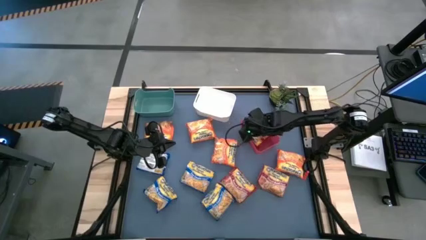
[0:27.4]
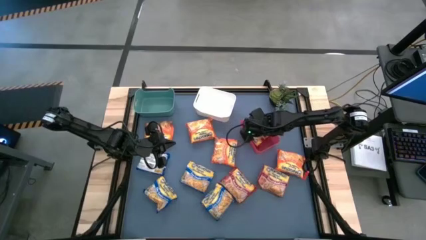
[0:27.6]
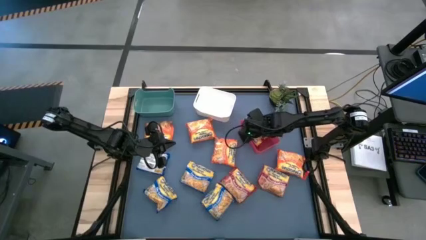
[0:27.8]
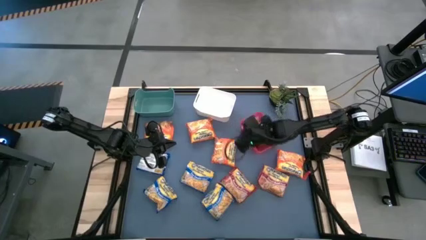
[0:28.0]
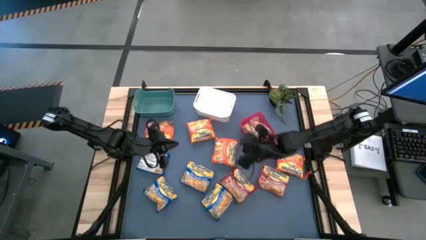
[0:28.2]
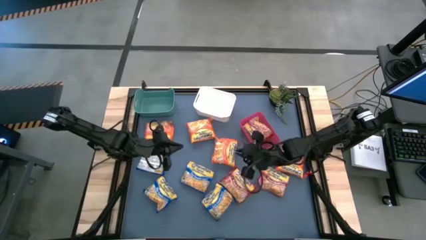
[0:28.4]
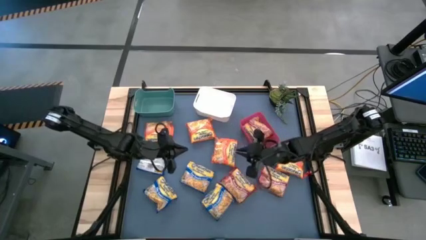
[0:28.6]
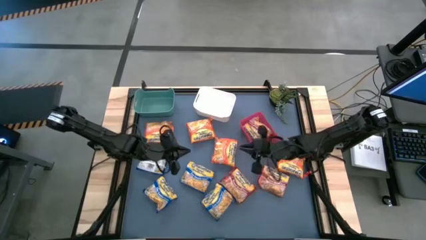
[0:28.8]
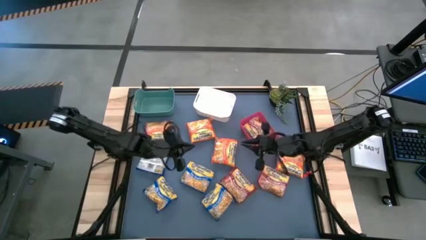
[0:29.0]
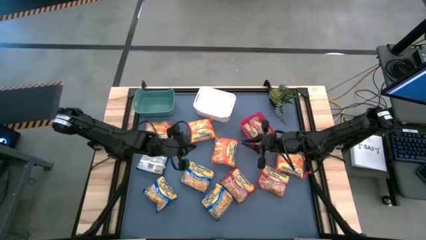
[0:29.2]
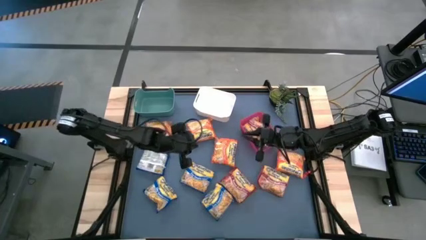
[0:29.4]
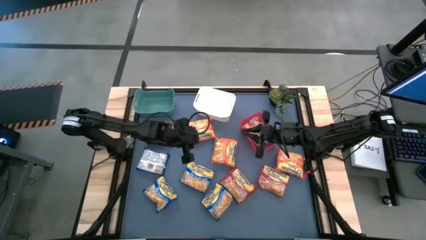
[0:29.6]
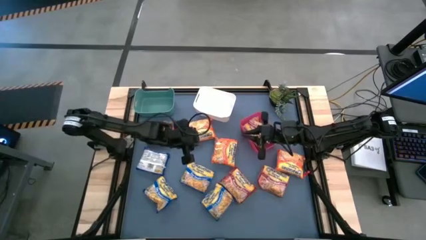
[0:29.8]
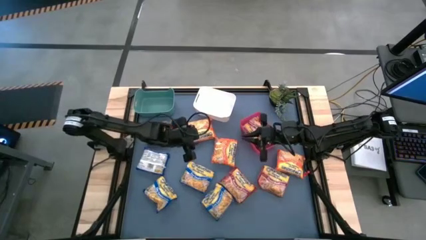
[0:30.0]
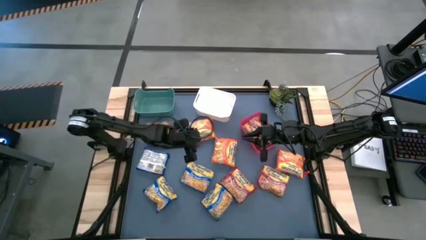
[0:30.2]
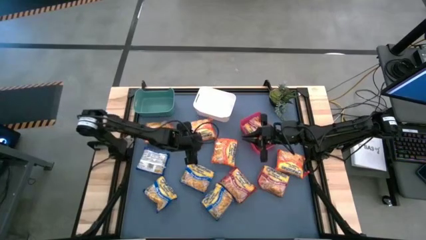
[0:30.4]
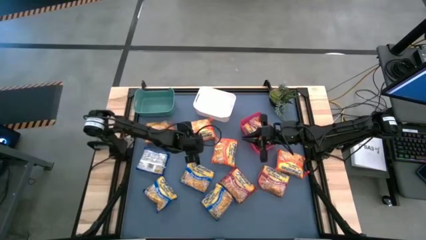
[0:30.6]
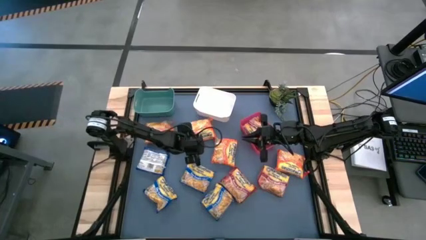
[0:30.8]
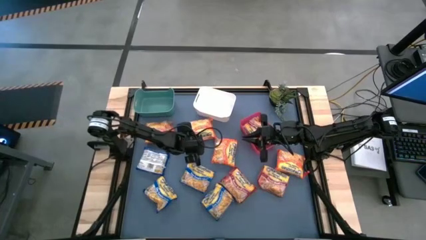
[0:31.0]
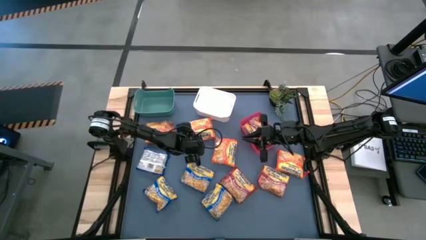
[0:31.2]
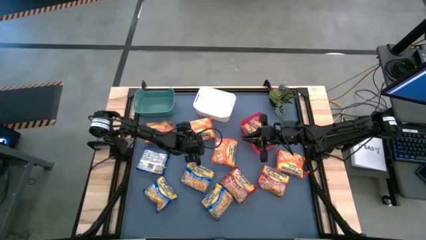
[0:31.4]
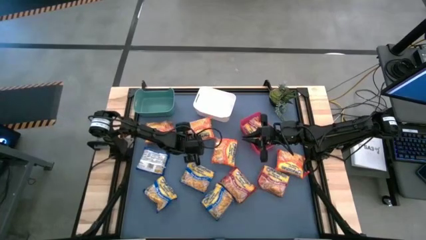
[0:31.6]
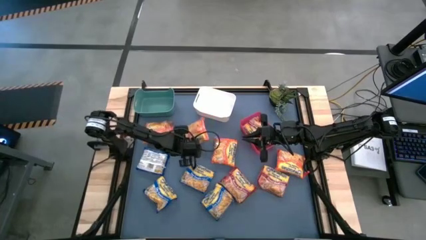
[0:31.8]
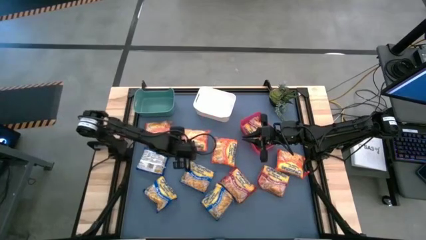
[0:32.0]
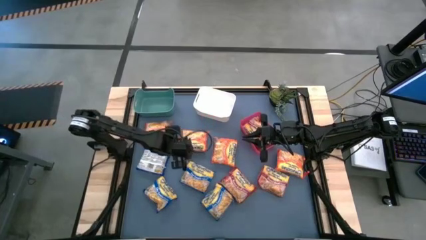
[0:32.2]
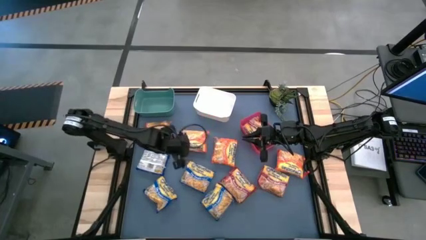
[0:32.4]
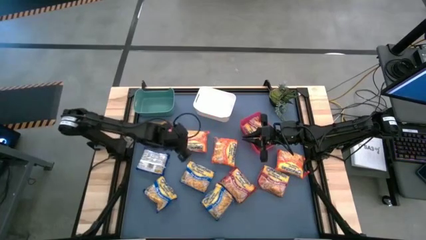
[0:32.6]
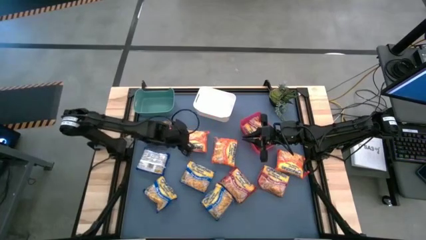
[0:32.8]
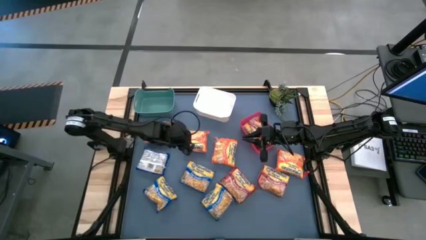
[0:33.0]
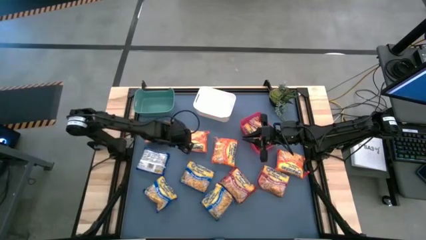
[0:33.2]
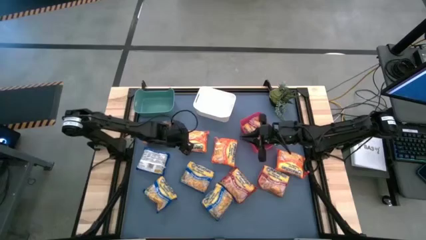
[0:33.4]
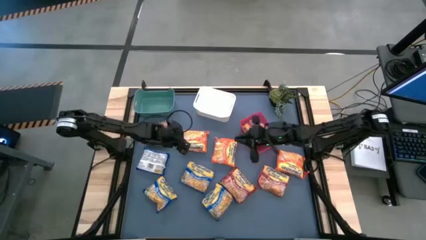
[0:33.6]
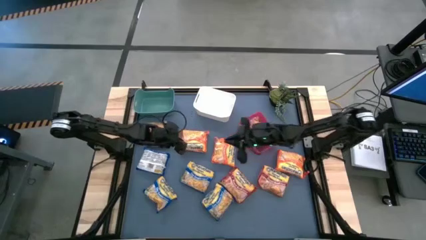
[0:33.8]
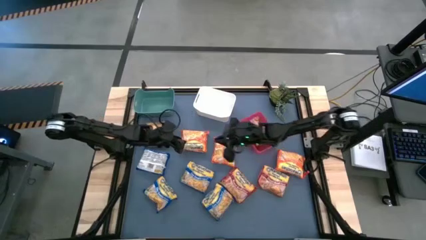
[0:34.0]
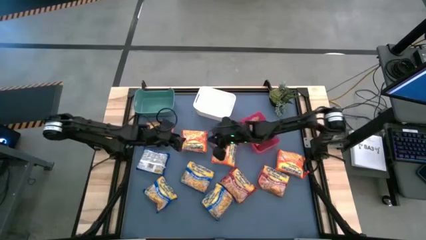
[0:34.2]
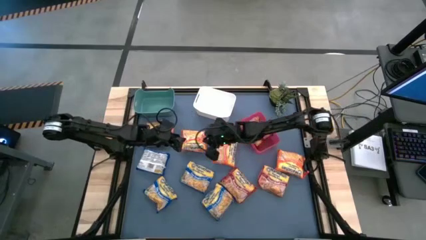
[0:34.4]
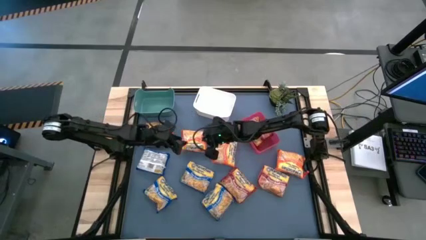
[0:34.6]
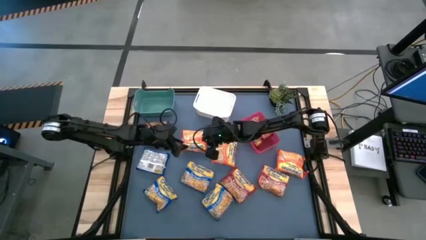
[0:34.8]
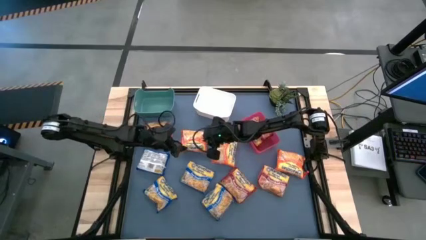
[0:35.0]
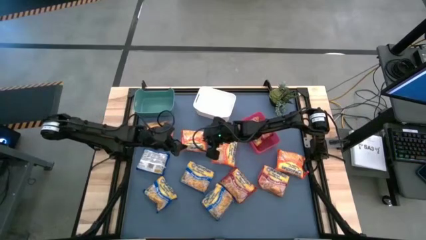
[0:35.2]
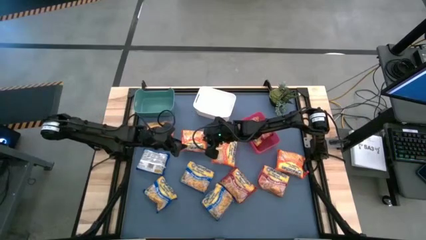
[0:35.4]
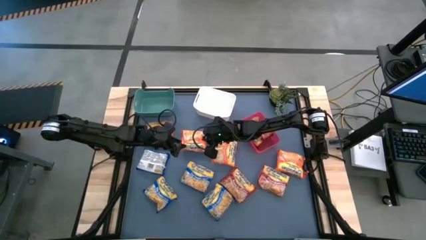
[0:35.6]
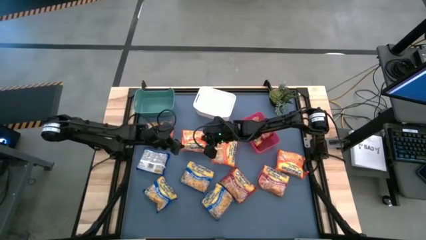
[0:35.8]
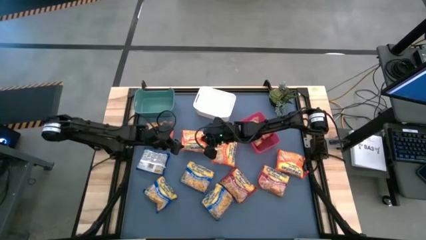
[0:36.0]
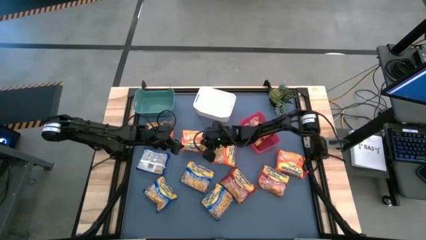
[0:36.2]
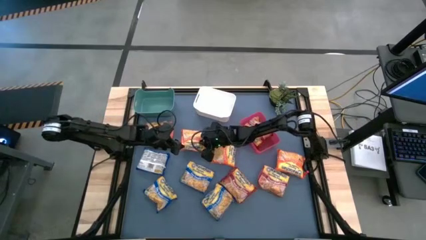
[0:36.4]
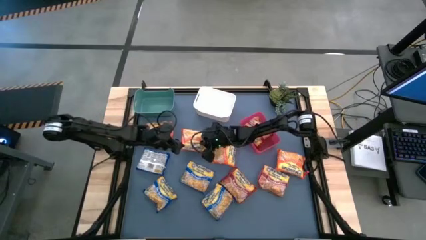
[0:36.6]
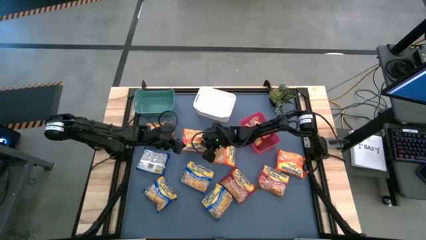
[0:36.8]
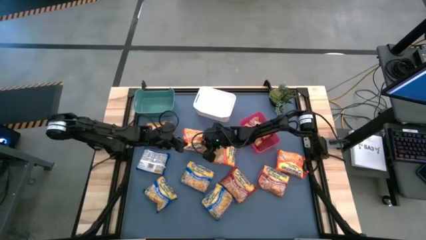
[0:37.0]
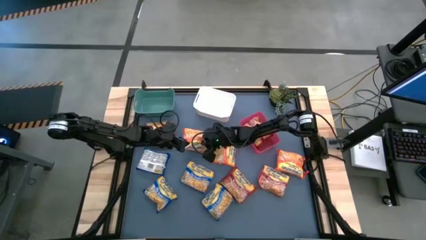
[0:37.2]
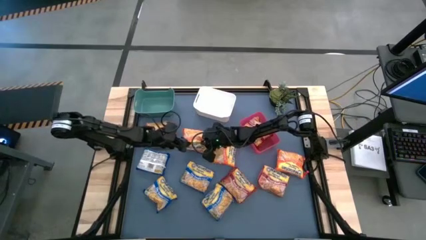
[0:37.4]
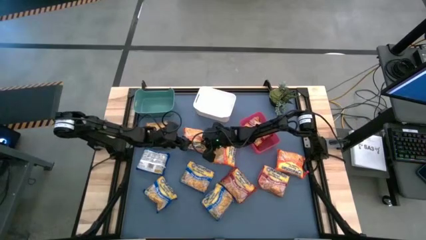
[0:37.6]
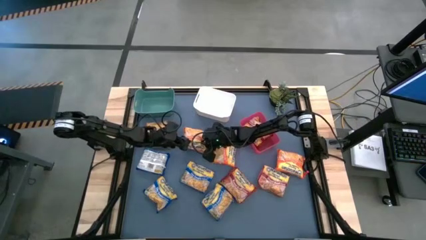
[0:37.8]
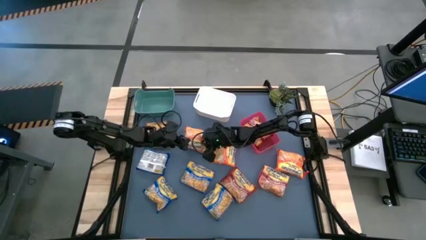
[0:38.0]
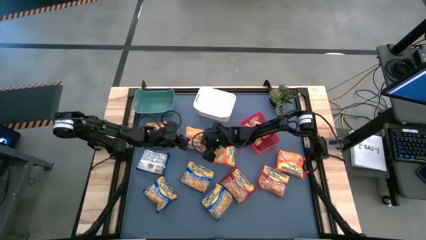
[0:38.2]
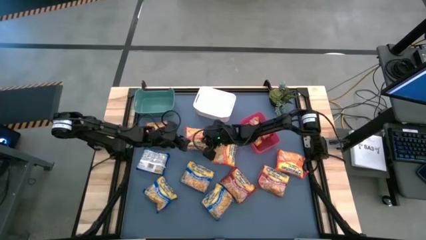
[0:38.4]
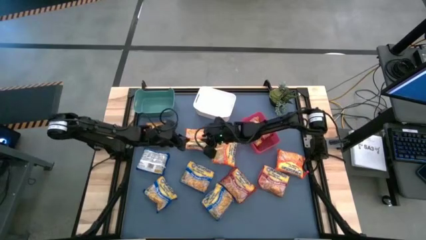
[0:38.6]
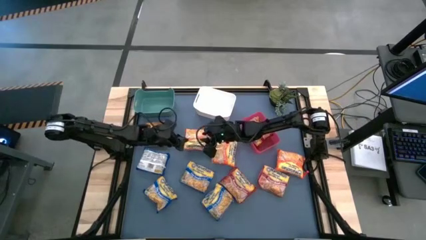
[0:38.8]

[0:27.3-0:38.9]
Task: Sort Maruchan noodles
Put the orange noodle pack into the green bin

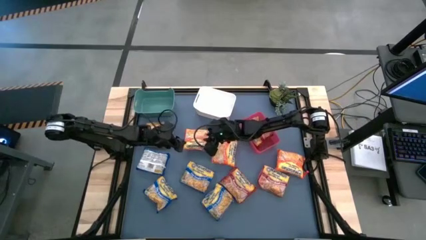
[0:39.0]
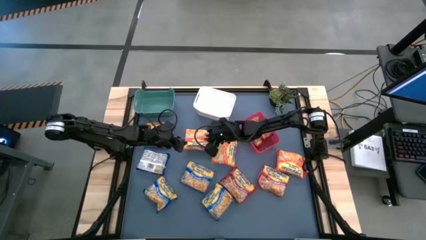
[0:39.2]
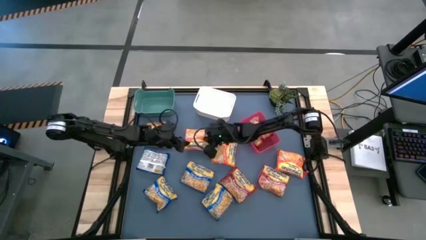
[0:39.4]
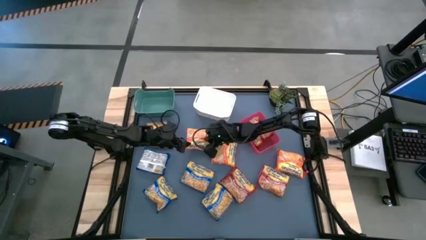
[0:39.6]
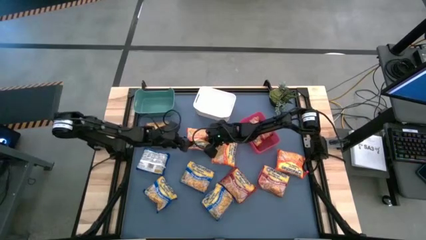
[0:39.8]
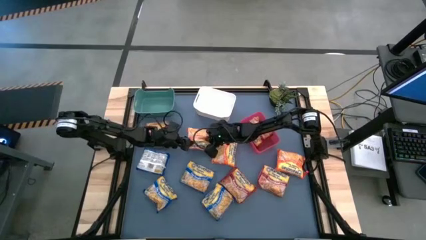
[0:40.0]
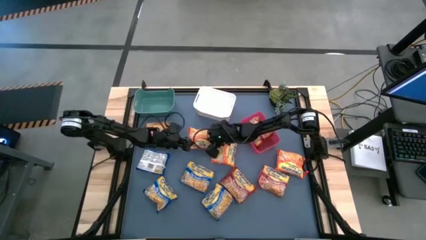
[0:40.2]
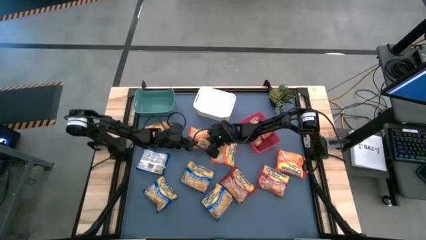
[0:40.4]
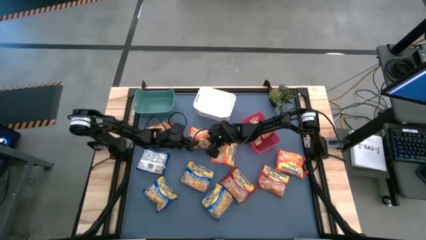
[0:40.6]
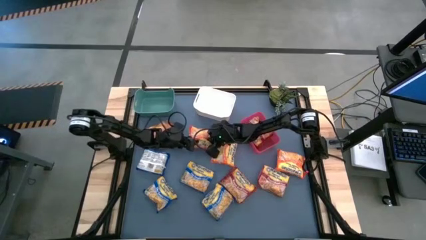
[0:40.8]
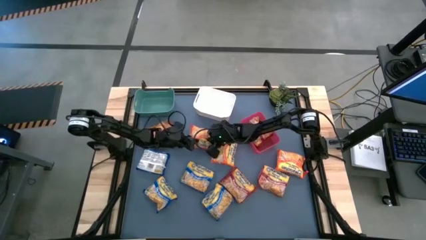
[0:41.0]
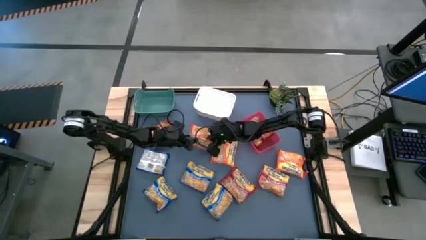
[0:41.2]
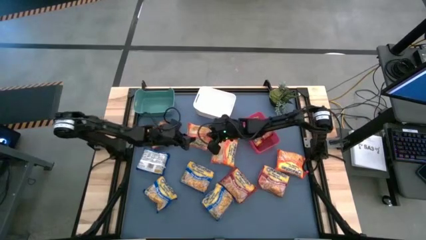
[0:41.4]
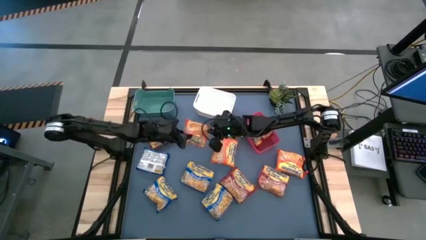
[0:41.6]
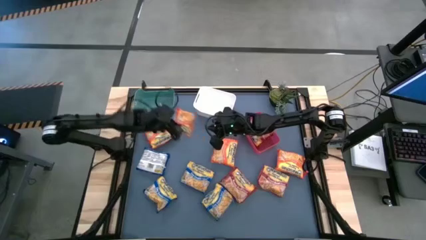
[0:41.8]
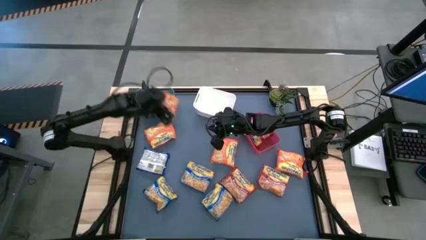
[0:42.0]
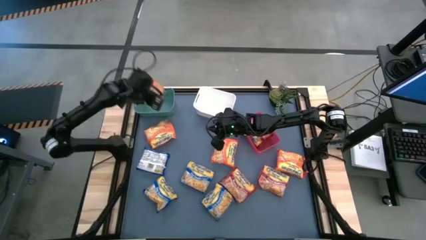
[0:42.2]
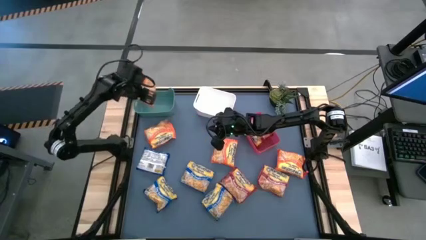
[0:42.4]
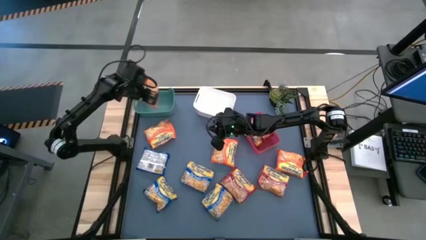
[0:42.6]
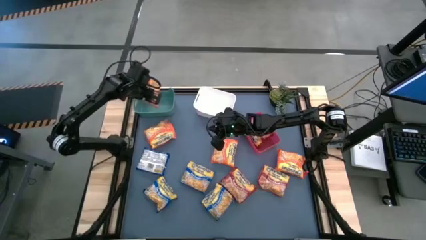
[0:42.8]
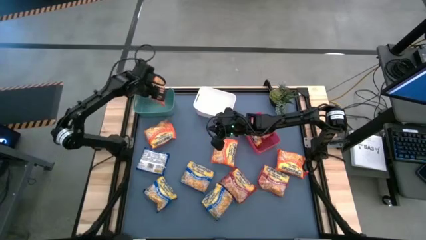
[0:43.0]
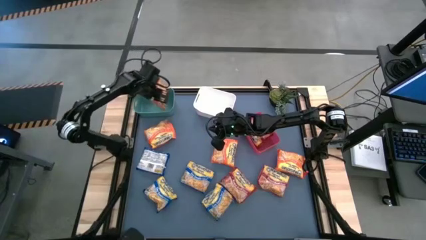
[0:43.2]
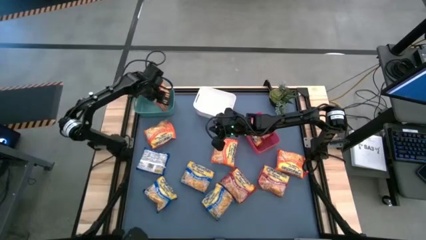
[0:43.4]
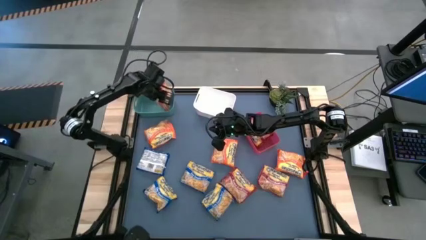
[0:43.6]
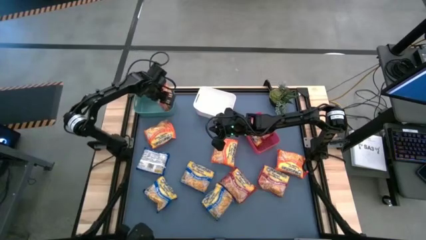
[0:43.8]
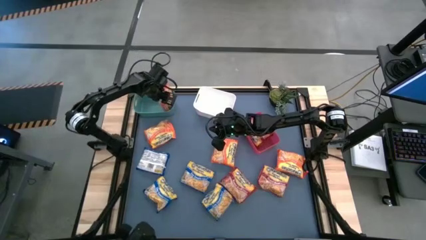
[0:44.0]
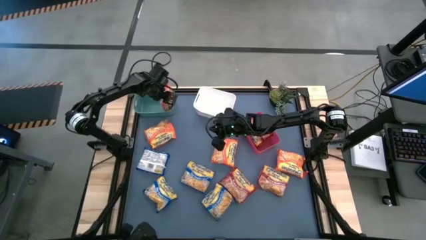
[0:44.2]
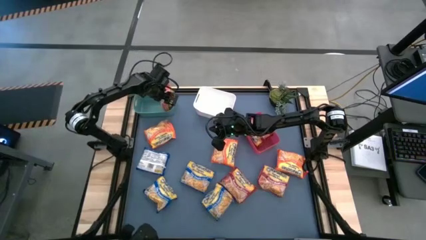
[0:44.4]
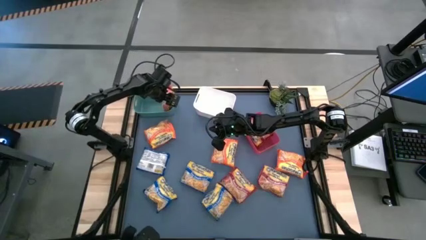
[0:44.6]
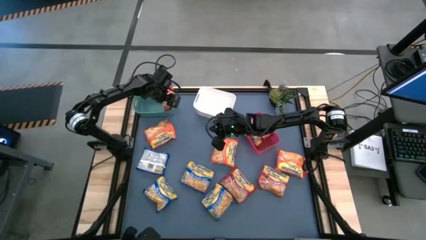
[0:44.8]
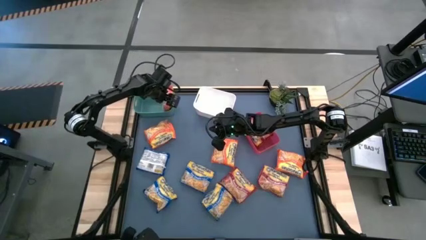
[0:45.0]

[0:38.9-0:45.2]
Put the orange noodle pack into the green bin
